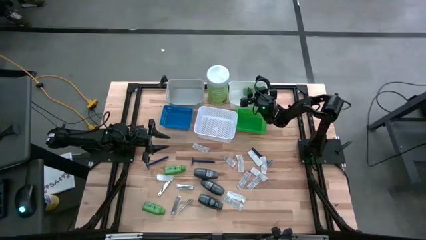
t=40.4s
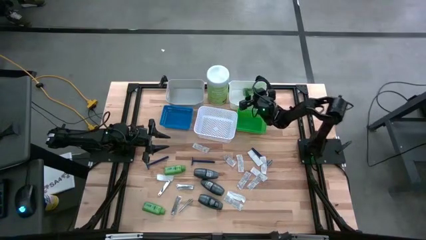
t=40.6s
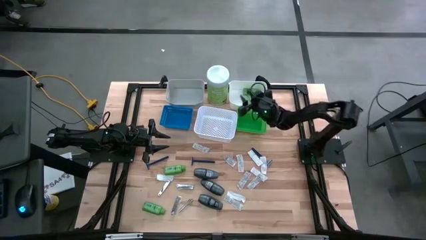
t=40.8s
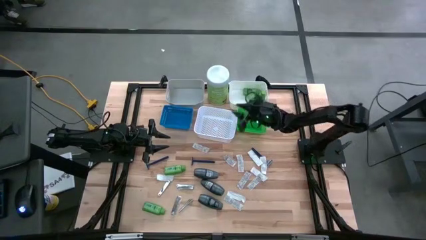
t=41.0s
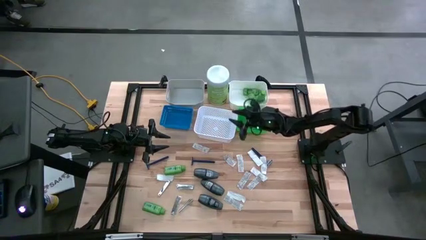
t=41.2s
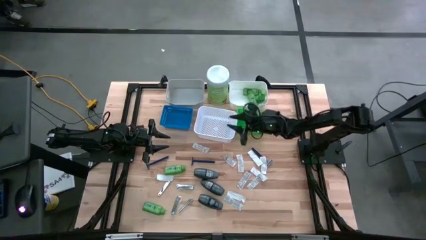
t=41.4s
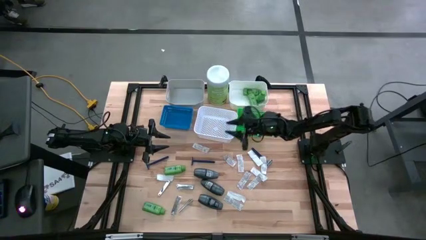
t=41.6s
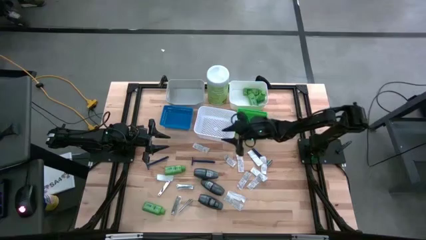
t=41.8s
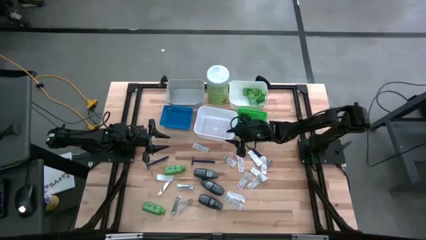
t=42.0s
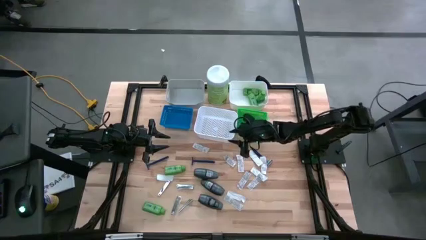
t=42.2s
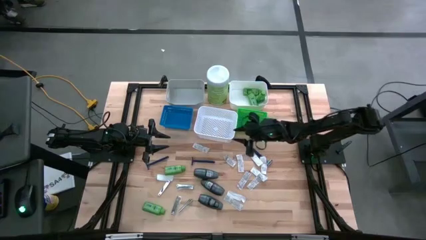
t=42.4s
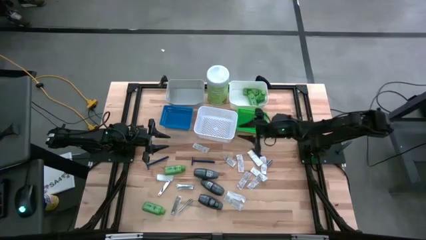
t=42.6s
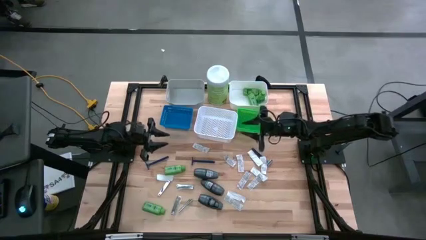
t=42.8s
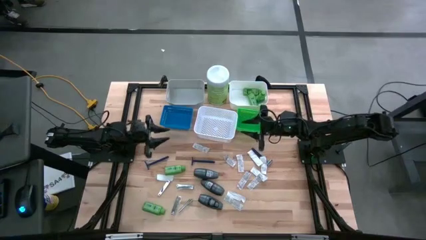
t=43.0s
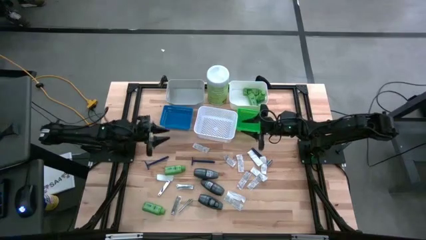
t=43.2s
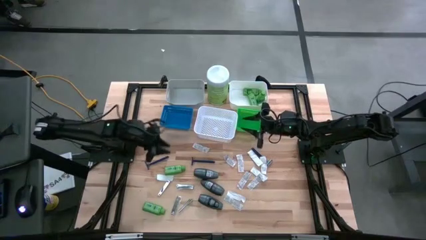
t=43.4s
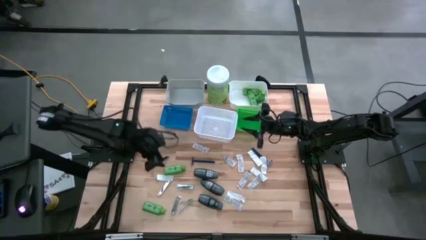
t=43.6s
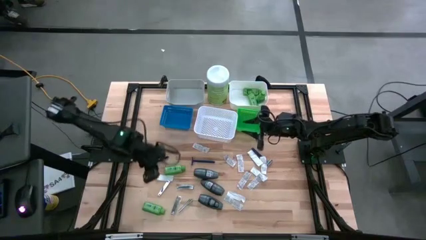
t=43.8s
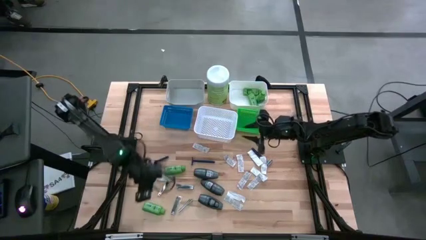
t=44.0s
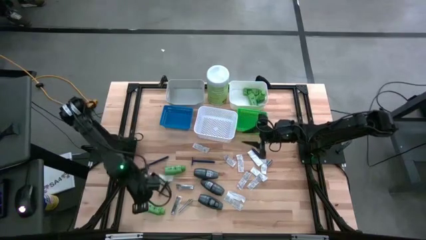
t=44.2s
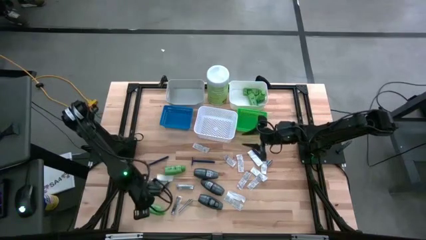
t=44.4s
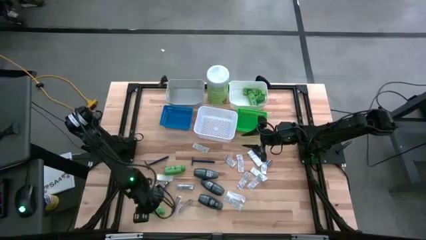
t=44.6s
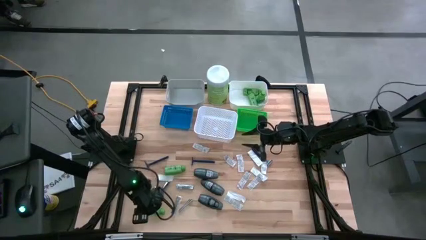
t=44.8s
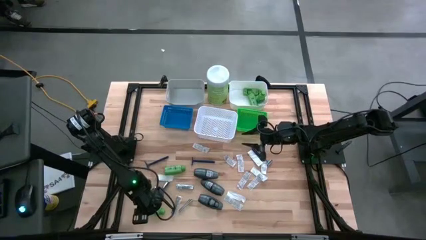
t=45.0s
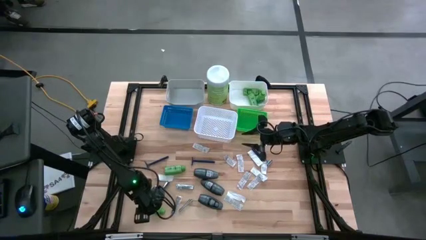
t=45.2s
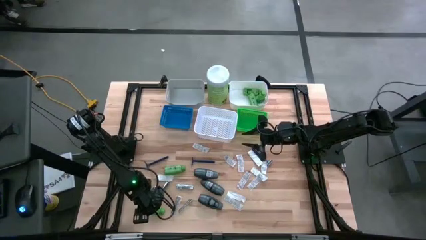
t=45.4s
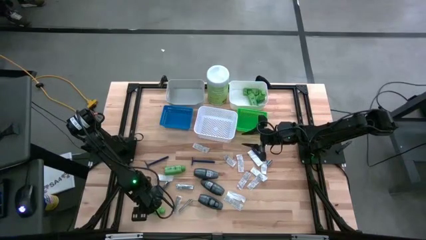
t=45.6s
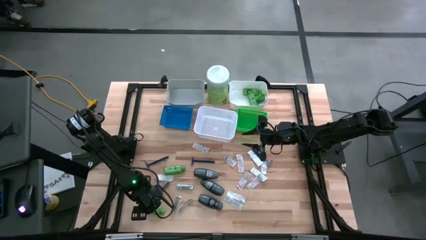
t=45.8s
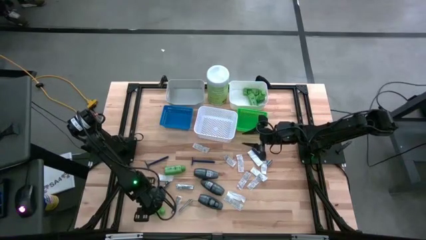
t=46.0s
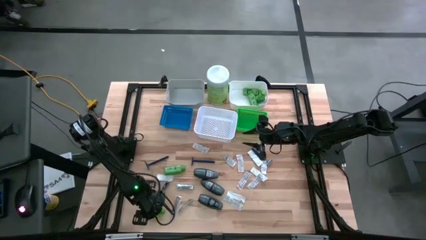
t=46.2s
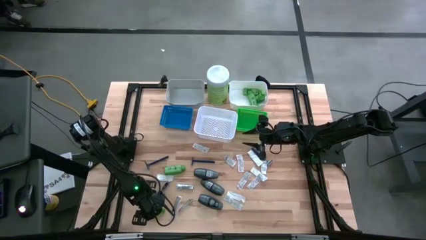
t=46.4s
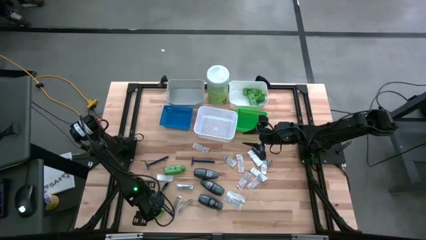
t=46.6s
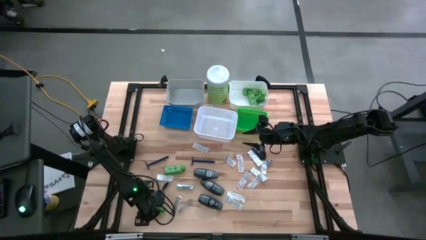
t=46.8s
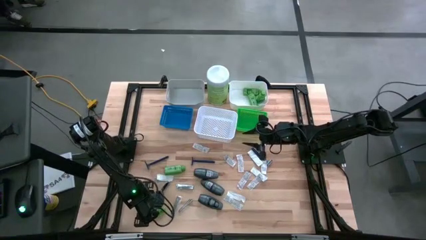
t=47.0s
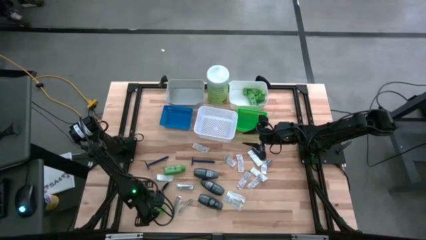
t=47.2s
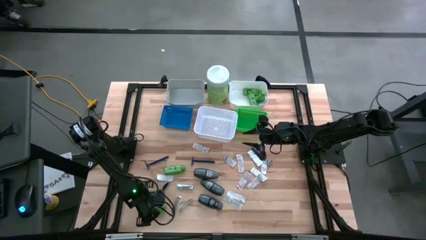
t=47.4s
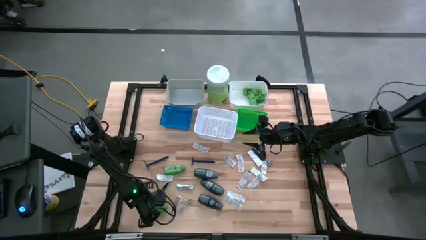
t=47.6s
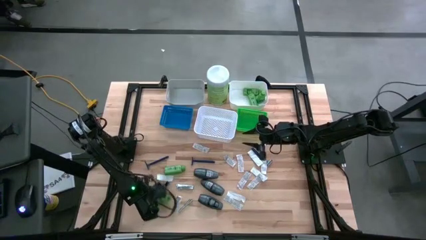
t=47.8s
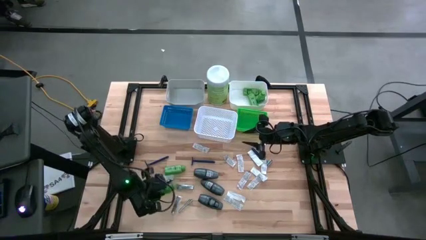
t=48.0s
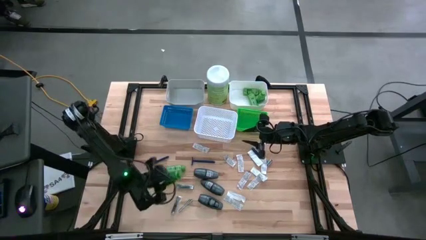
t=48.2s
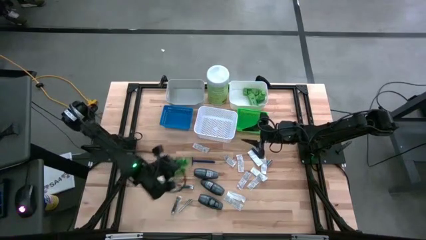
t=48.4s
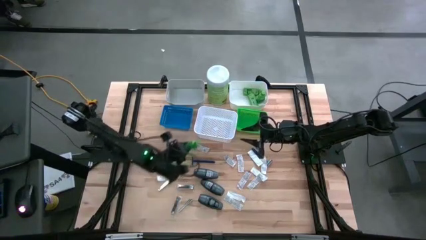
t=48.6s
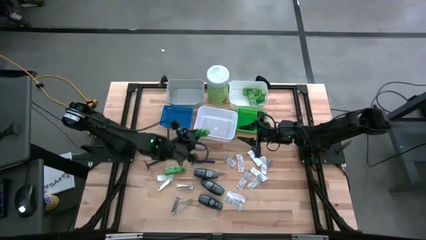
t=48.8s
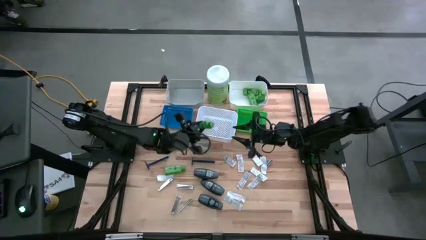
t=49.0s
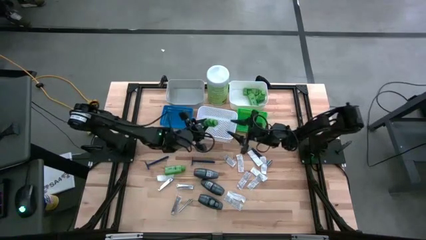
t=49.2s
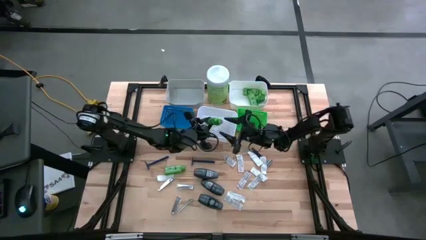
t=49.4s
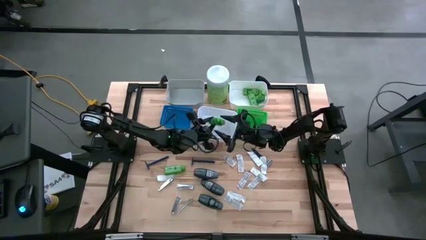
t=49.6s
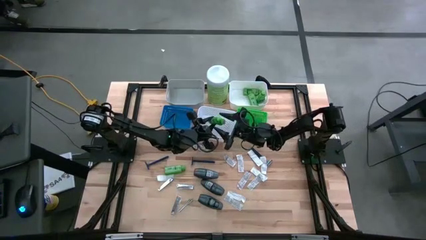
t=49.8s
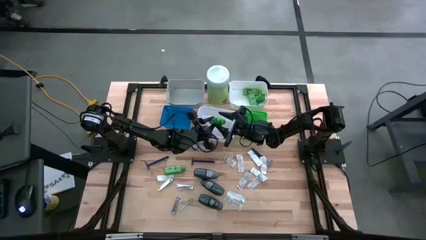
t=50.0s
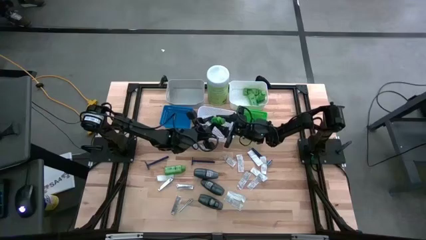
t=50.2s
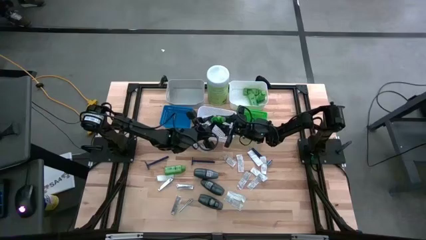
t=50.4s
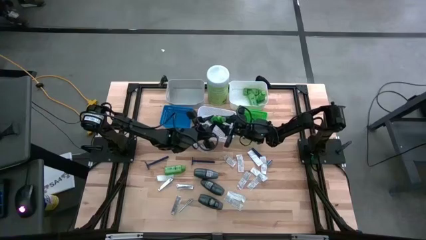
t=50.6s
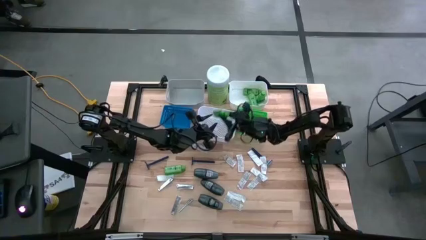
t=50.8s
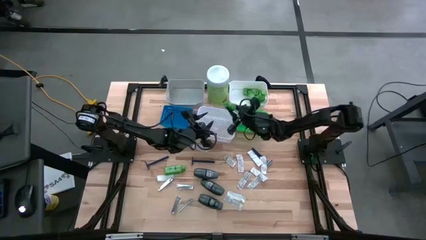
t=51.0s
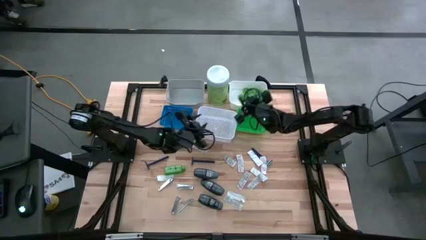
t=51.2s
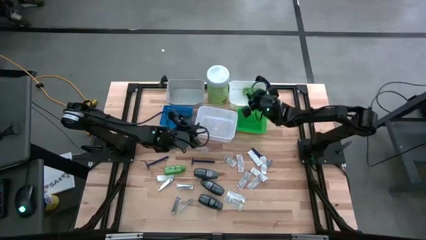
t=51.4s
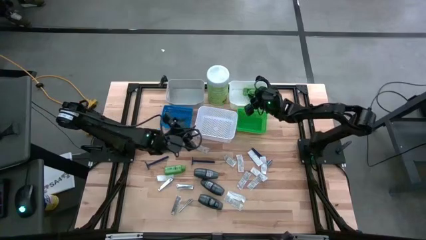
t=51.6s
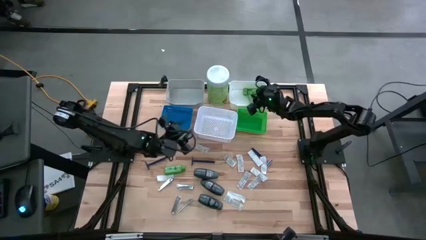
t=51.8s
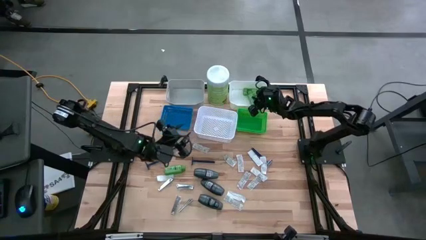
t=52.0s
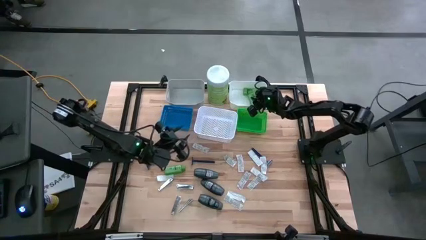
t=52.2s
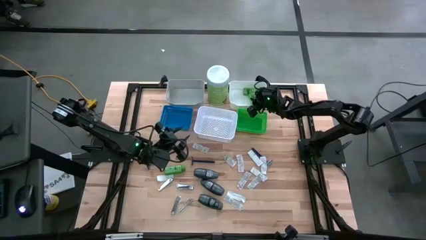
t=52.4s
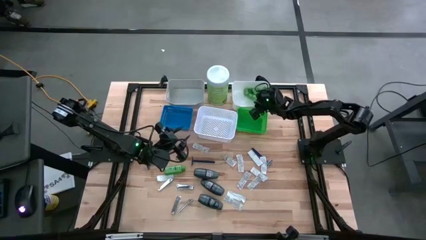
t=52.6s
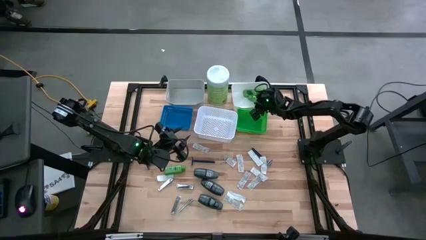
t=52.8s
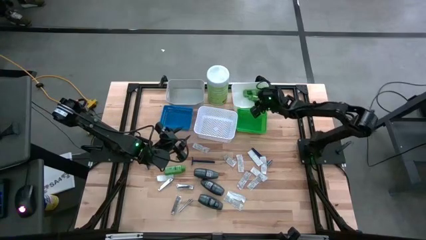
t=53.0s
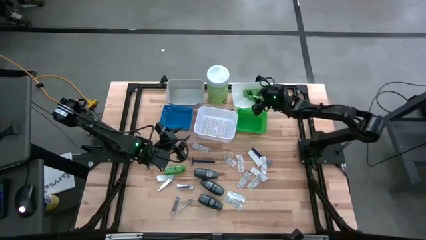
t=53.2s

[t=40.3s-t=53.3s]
Task: Pick & Place Travel size toiletries
Put the green shampoo into the small white bin
